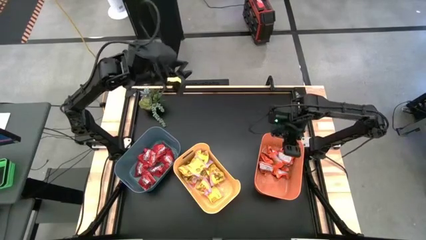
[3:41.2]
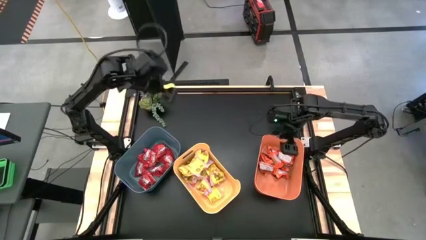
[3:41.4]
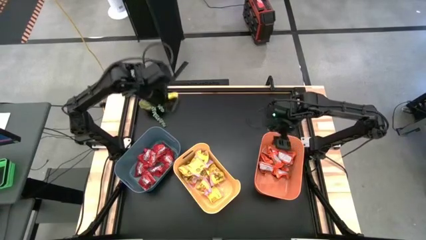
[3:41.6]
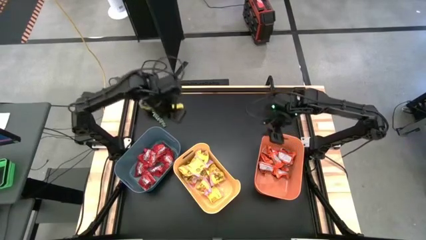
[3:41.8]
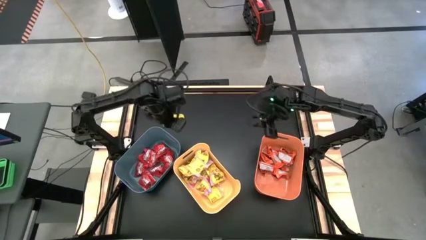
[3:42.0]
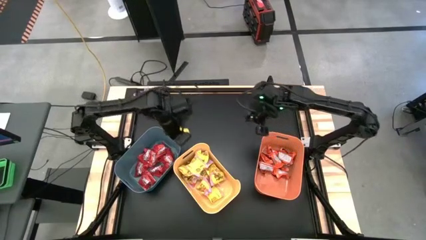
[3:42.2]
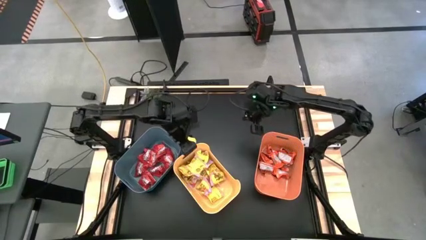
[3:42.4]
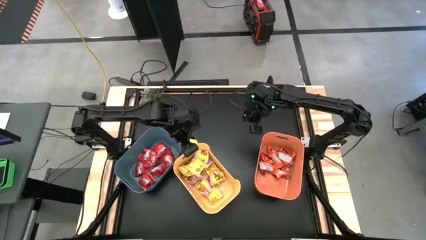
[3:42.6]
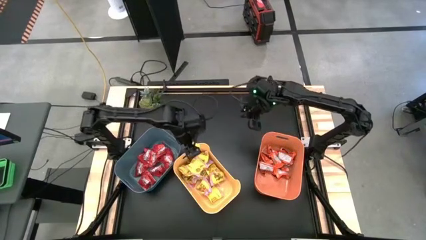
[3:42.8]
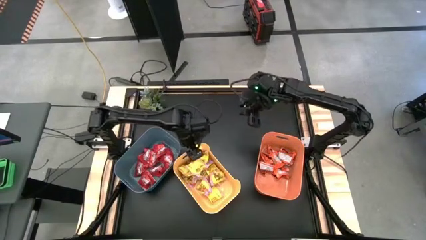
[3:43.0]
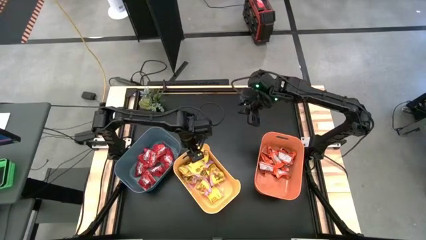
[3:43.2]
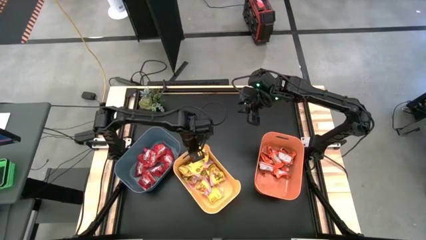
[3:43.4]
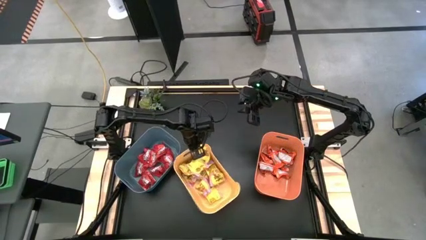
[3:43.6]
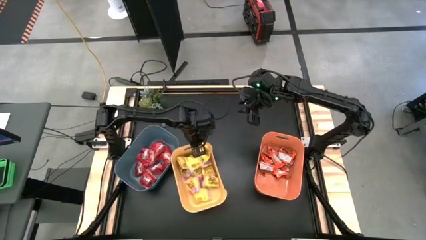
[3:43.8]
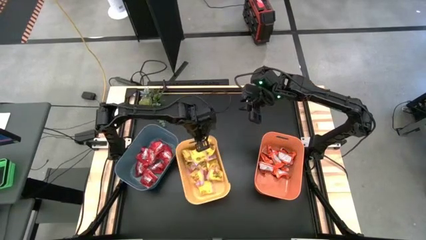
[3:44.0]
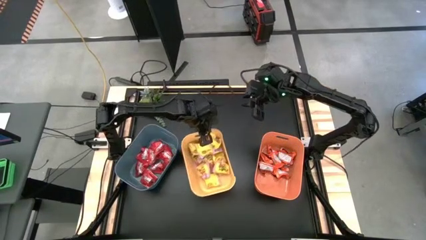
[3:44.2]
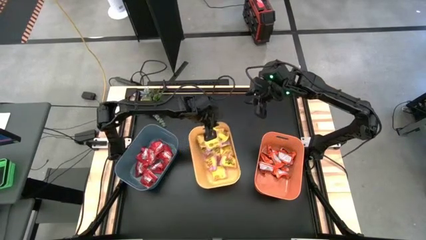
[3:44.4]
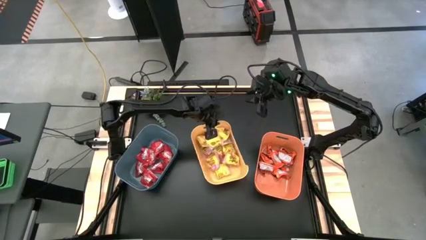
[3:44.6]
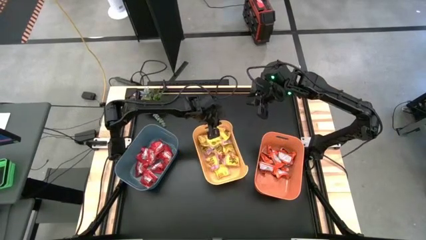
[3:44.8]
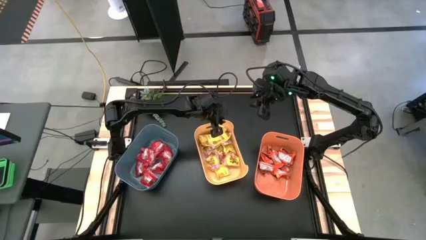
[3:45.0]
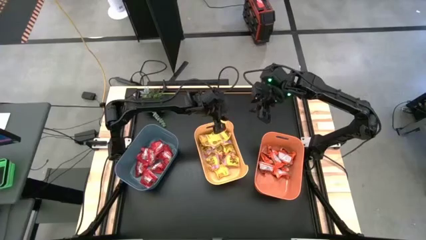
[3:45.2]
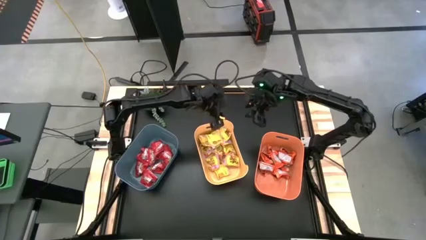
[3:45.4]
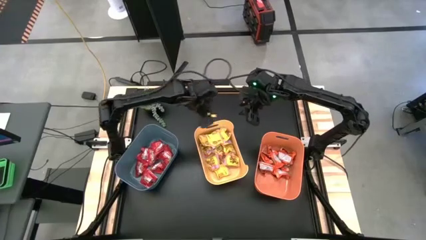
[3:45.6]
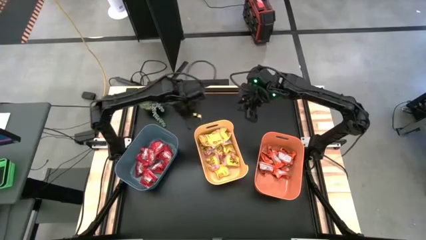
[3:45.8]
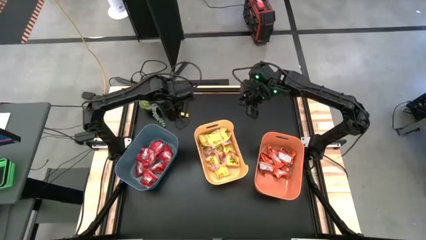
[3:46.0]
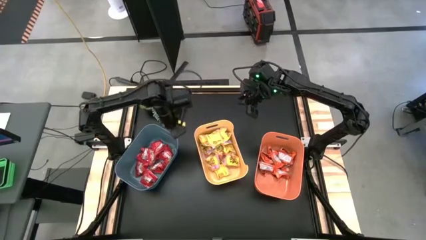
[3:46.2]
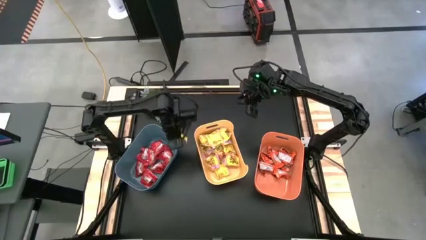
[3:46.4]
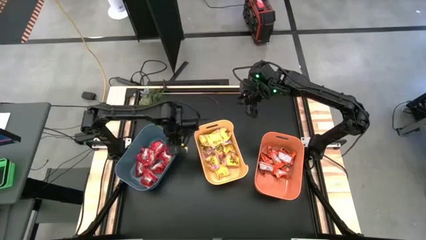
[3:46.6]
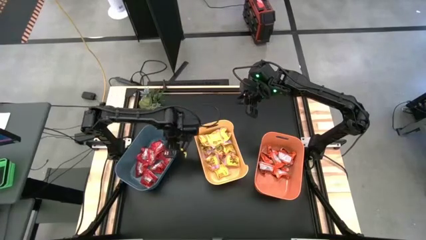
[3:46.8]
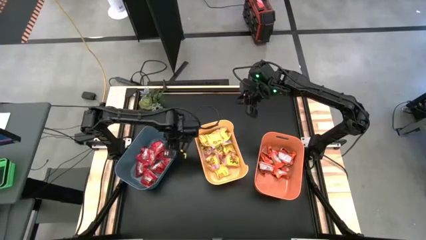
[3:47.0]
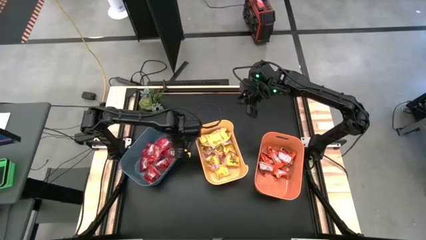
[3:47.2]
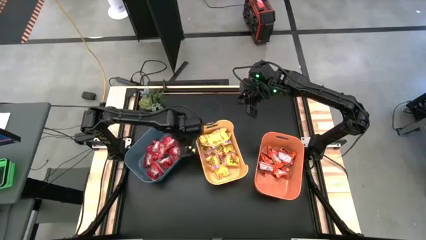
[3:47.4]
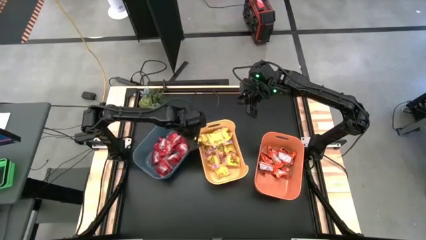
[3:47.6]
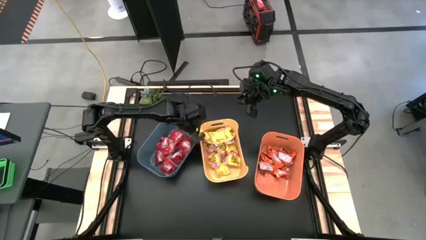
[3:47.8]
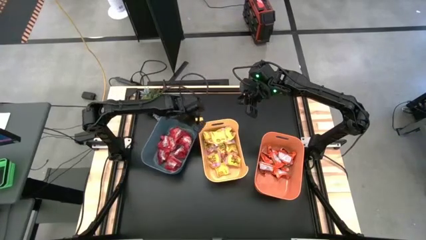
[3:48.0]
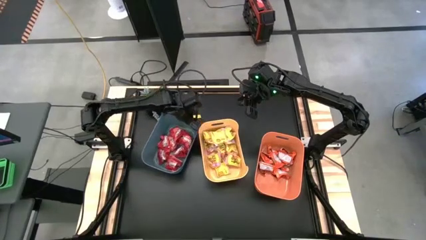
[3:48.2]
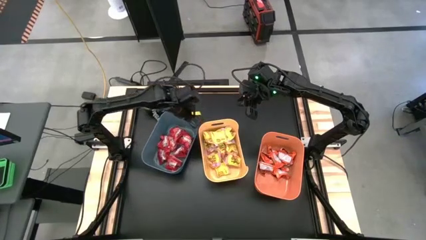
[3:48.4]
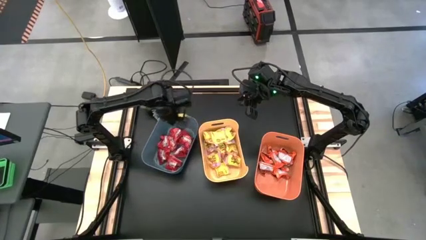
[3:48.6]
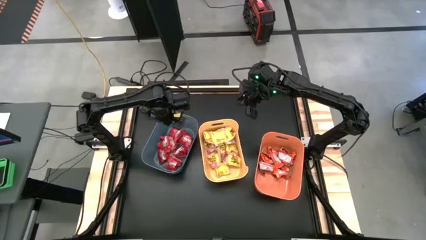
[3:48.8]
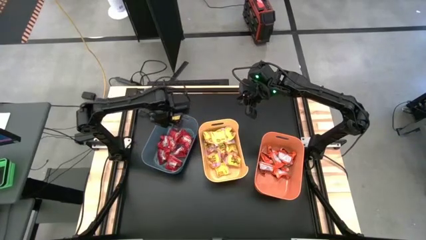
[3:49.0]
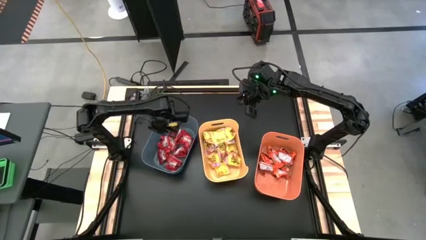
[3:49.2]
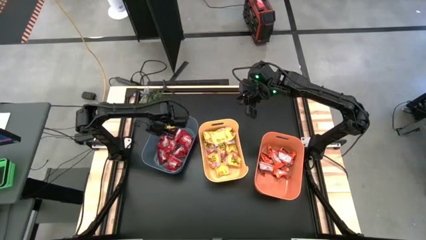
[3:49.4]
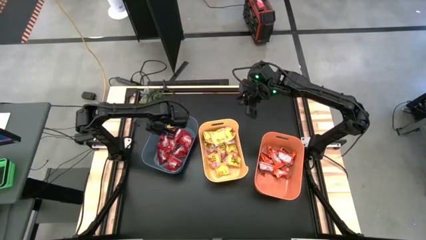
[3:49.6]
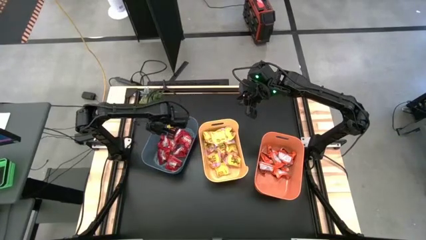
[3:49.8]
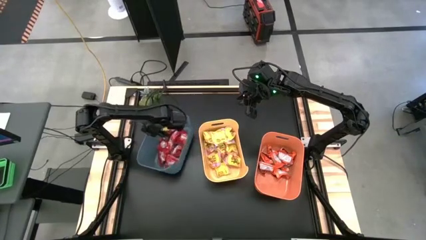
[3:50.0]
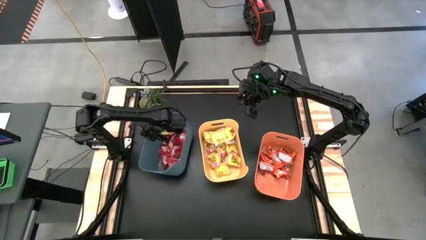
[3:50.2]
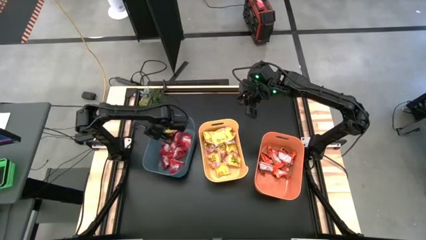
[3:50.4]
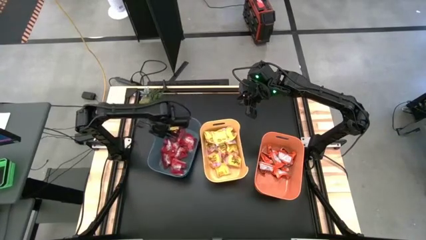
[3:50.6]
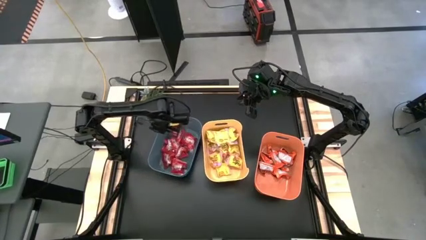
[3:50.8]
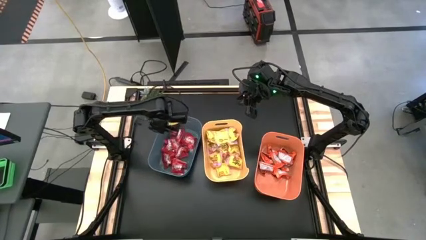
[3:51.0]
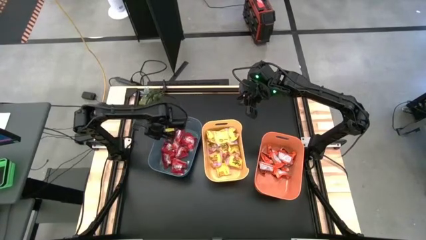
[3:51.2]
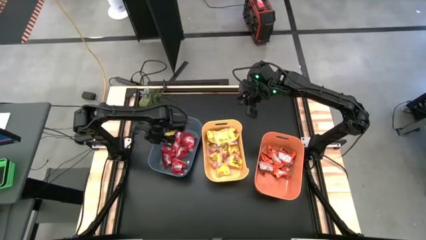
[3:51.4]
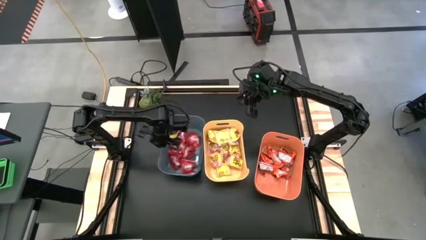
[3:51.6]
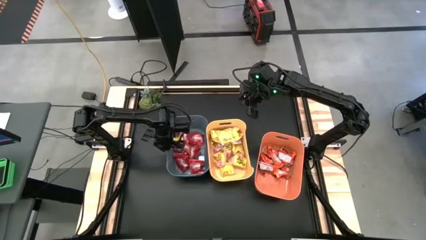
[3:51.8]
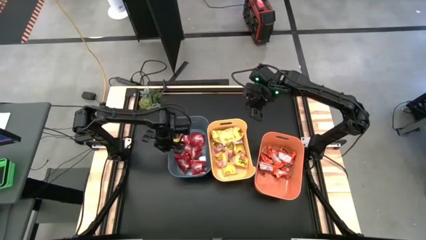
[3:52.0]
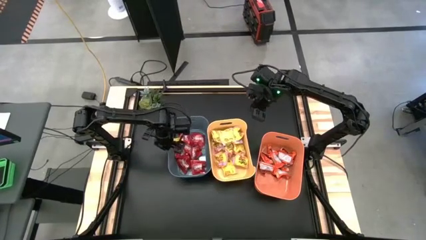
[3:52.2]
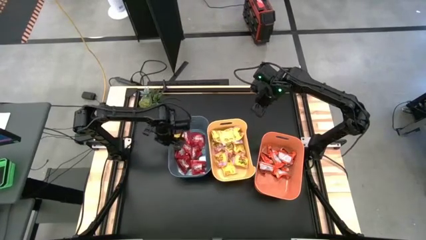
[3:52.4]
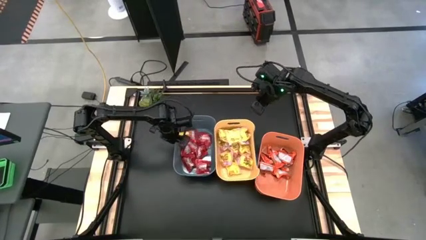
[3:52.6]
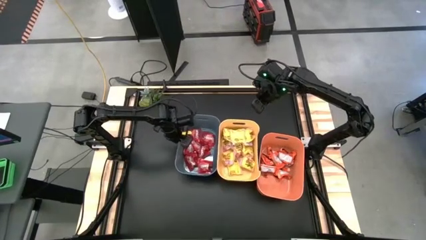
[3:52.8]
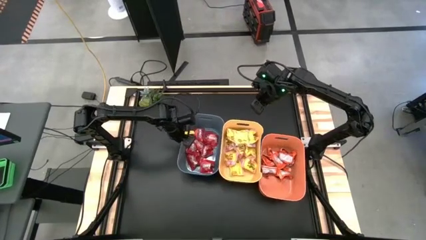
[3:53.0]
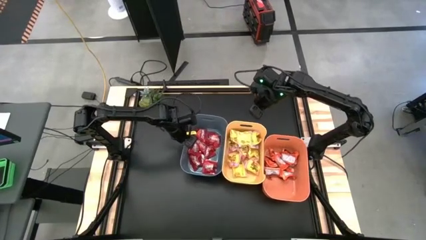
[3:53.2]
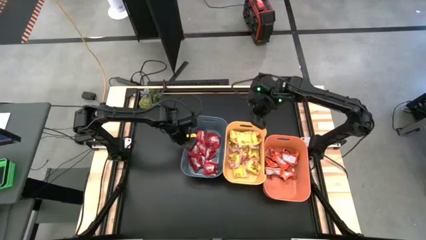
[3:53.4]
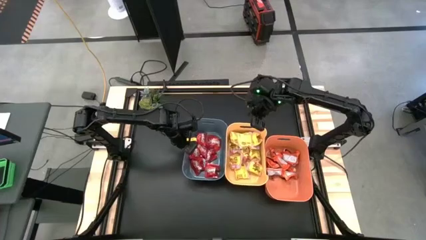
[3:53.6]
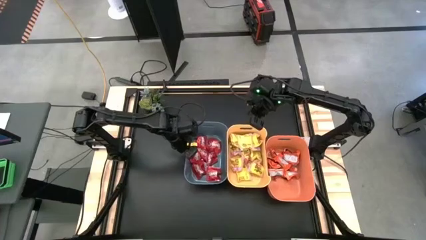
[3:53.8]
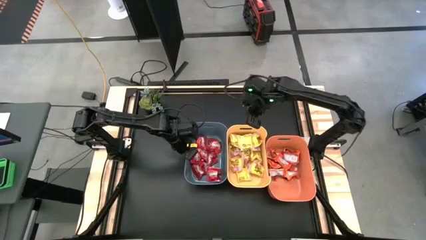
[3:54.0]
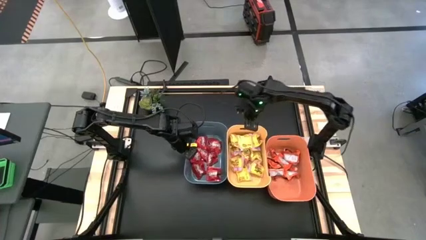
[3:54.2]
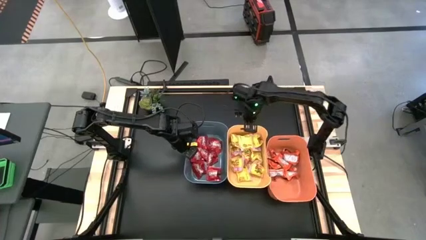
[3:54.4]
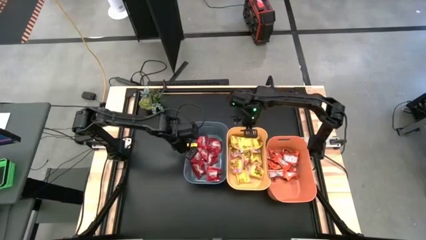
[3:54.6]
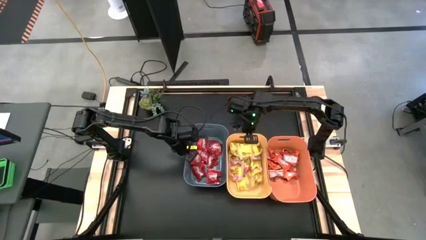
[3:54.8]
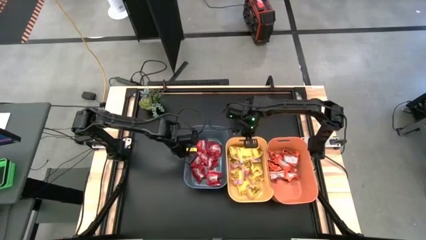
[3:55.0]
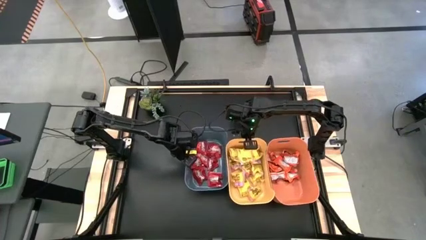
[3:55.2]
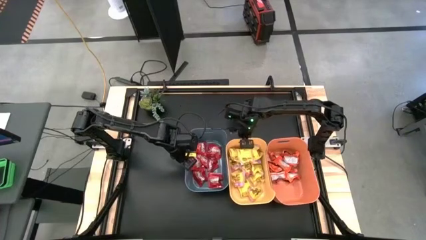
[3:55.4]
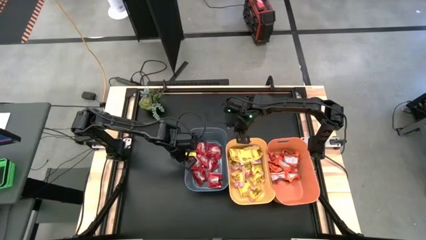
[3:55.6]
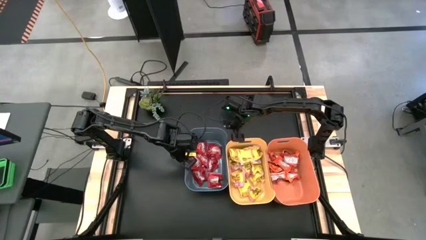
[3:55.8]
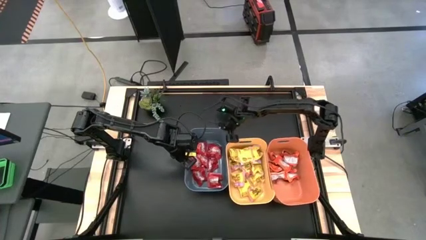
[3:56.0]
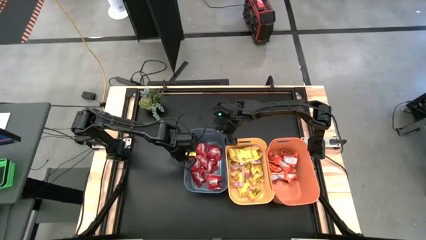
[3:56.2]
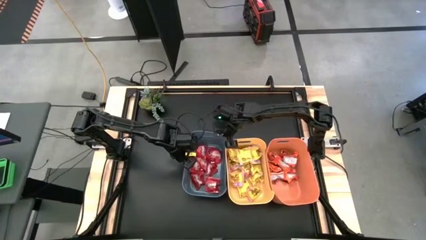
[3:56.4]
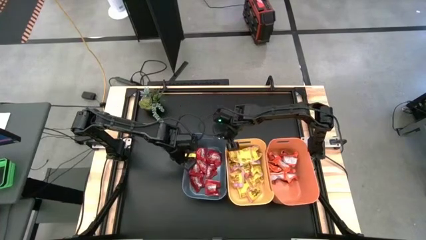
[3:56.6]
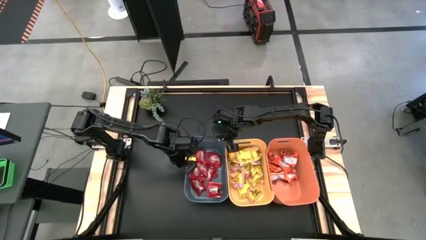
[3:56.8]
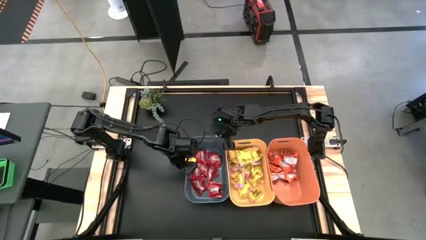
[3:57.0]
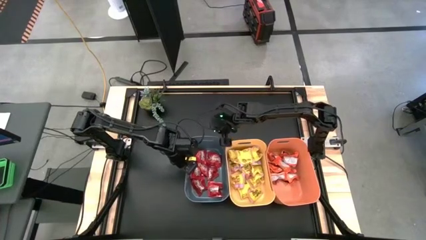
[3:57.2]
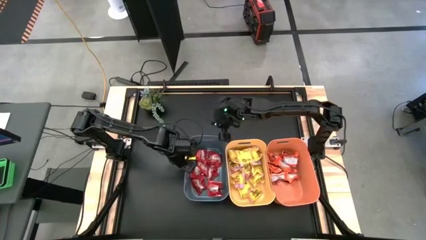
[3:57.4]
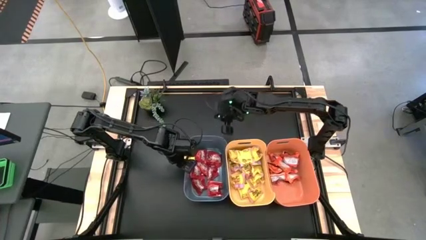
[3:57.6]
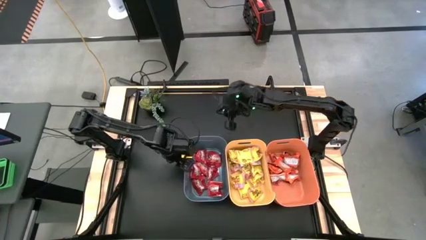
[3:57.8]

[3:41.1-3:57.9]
Task: Sort candy
Adjust the bins
